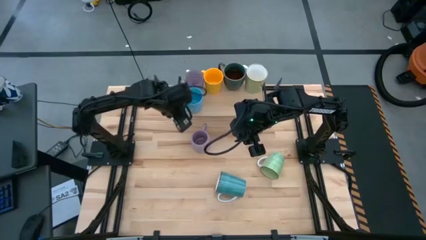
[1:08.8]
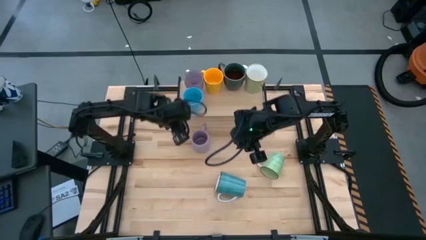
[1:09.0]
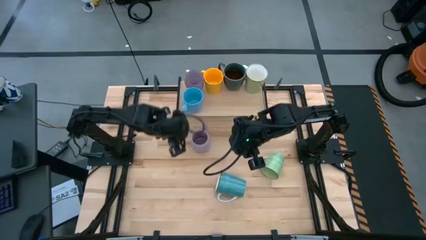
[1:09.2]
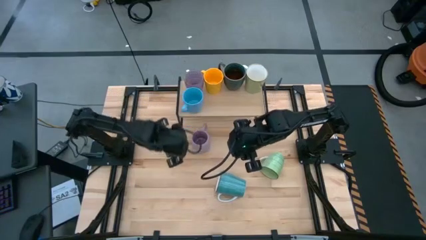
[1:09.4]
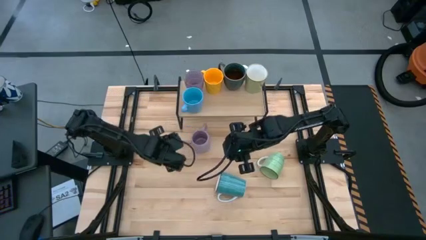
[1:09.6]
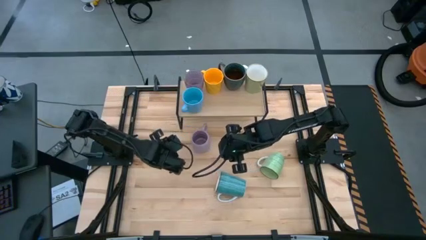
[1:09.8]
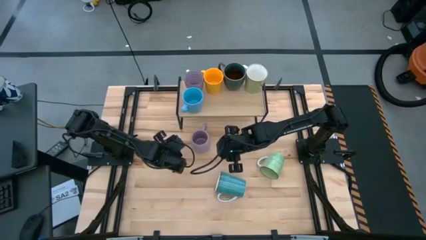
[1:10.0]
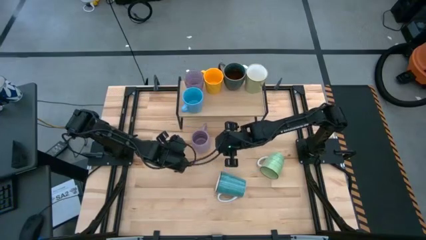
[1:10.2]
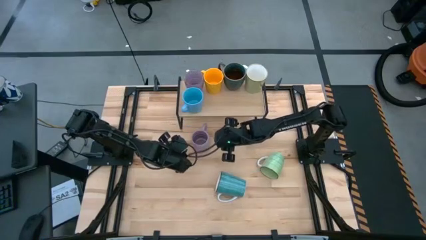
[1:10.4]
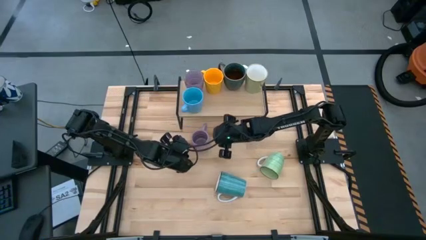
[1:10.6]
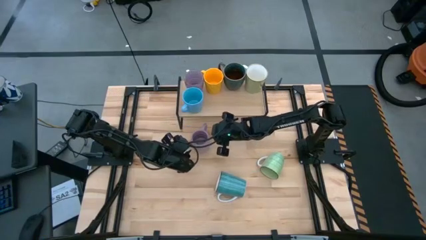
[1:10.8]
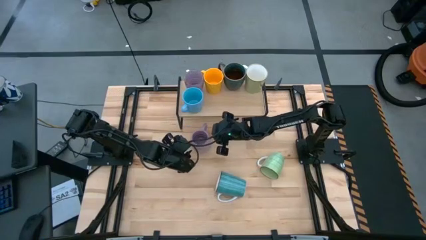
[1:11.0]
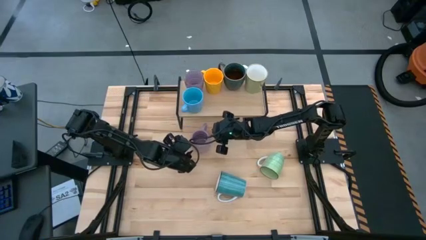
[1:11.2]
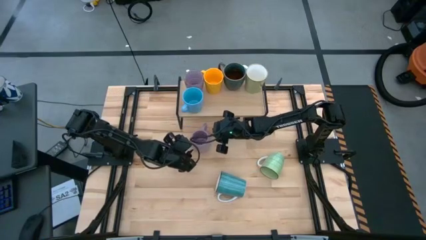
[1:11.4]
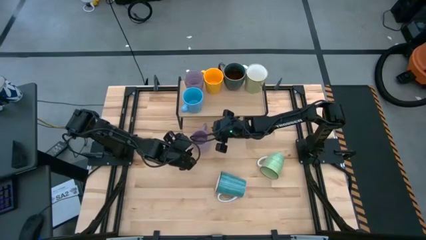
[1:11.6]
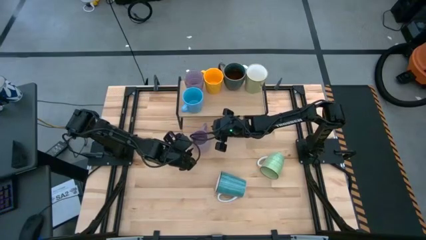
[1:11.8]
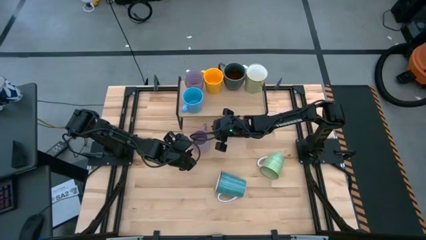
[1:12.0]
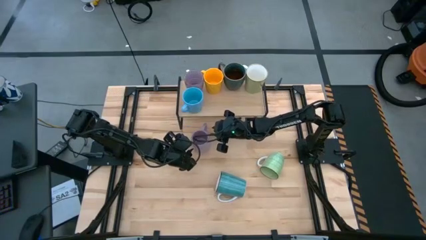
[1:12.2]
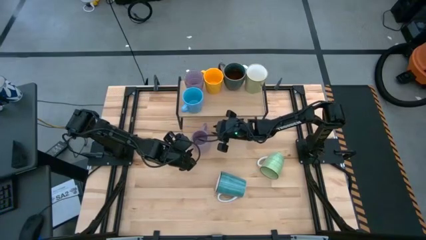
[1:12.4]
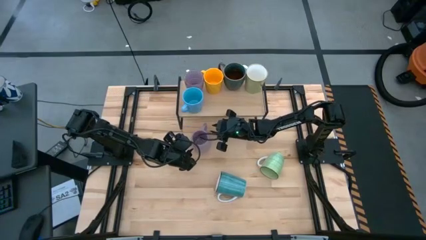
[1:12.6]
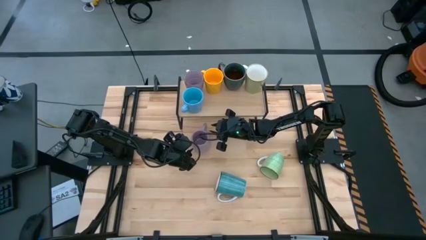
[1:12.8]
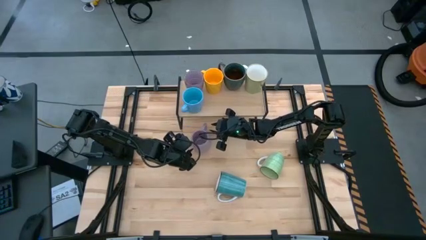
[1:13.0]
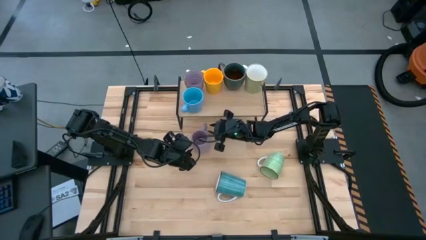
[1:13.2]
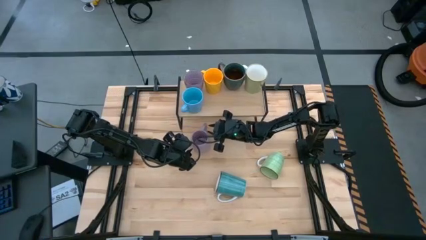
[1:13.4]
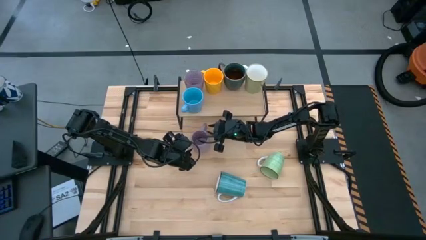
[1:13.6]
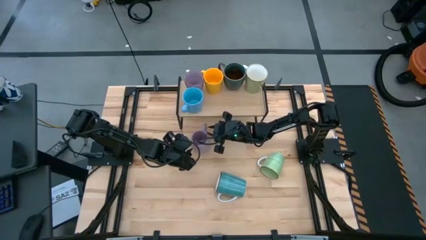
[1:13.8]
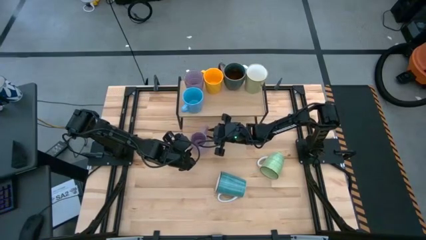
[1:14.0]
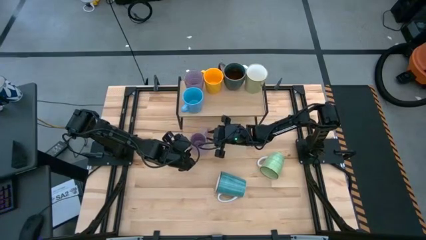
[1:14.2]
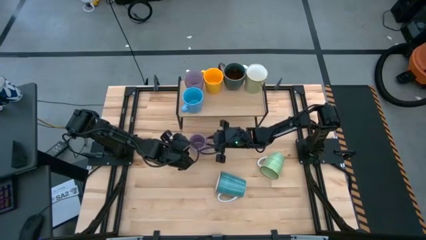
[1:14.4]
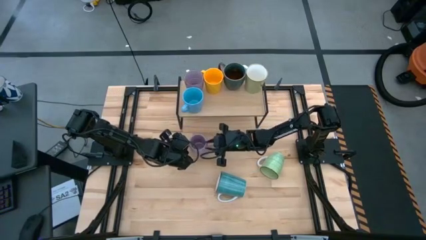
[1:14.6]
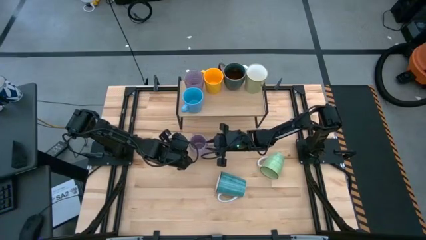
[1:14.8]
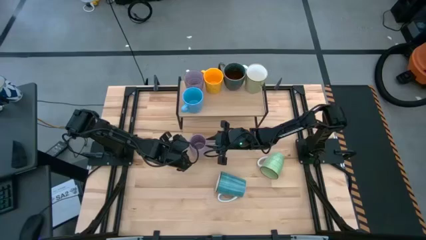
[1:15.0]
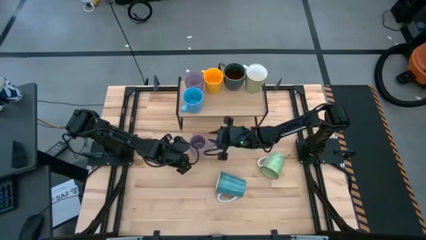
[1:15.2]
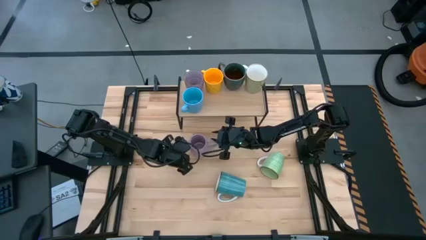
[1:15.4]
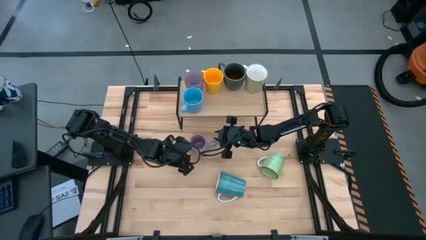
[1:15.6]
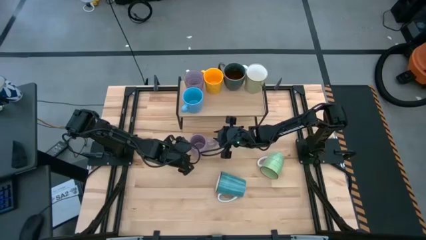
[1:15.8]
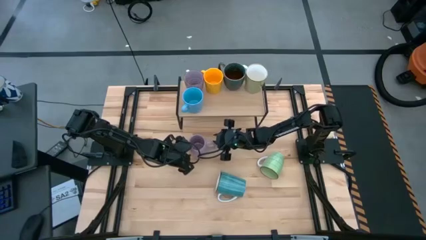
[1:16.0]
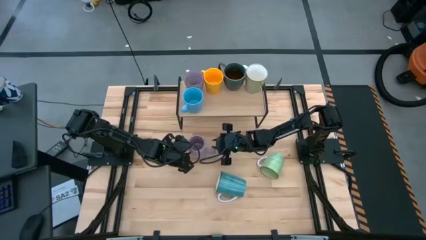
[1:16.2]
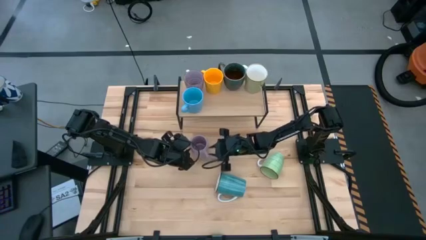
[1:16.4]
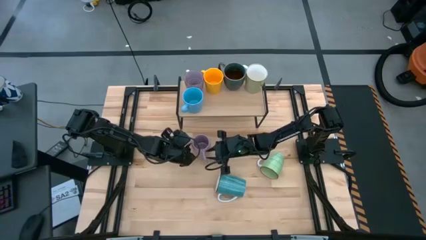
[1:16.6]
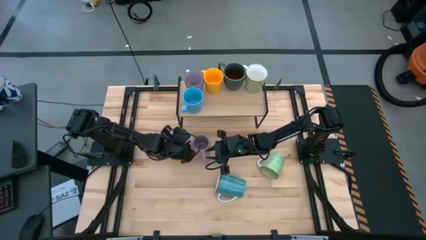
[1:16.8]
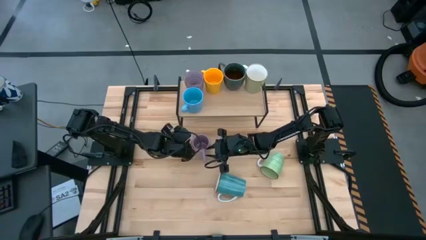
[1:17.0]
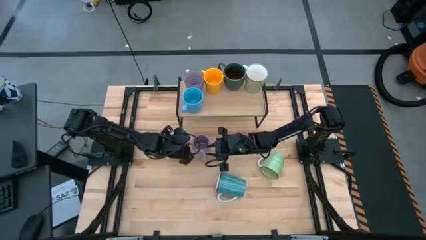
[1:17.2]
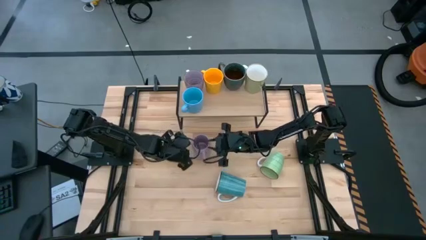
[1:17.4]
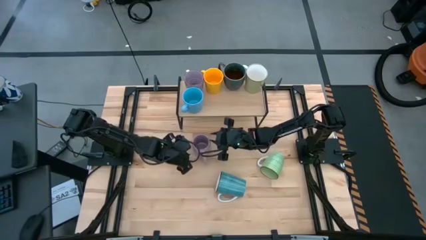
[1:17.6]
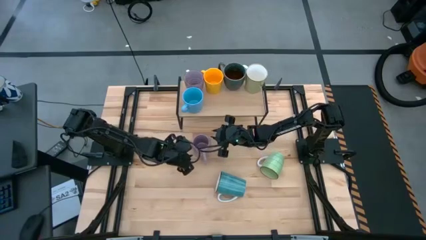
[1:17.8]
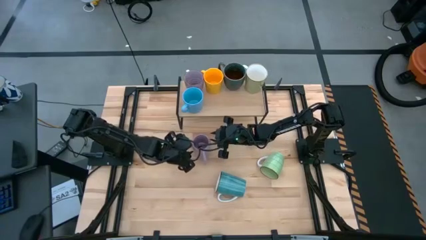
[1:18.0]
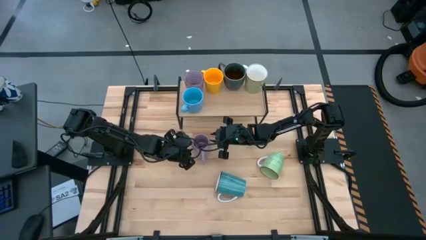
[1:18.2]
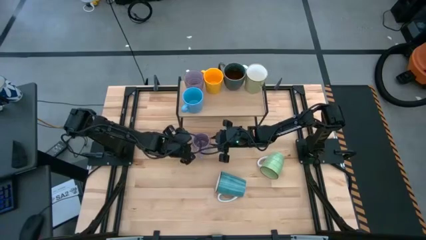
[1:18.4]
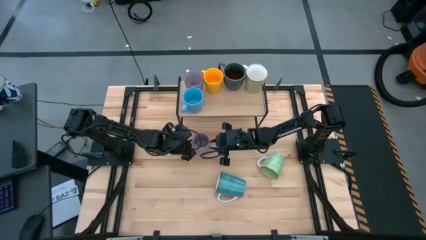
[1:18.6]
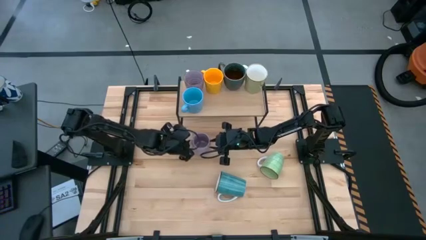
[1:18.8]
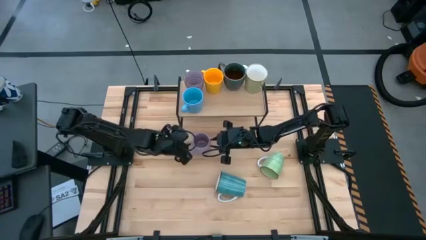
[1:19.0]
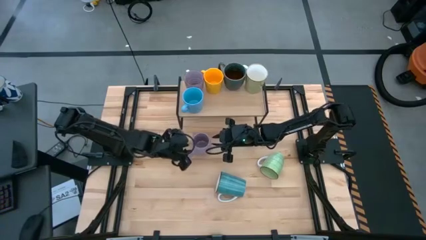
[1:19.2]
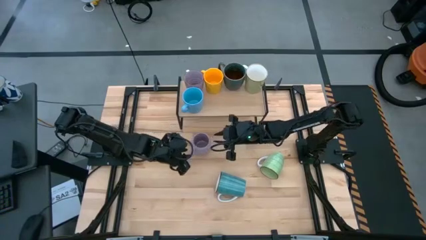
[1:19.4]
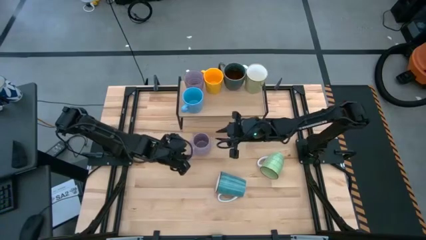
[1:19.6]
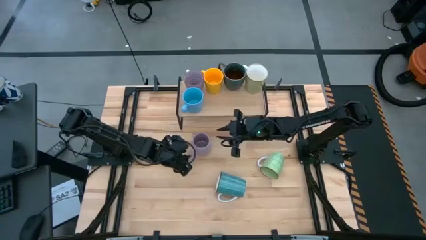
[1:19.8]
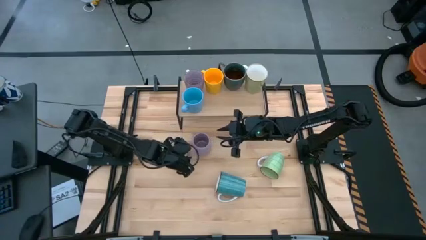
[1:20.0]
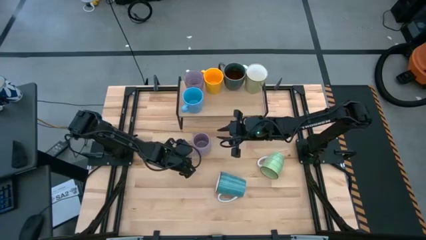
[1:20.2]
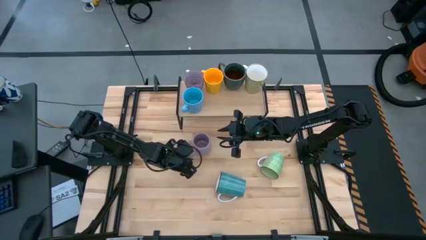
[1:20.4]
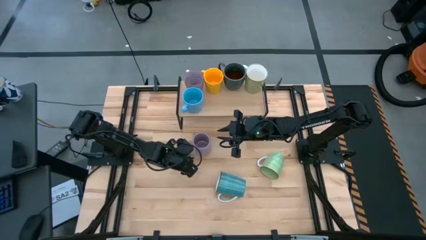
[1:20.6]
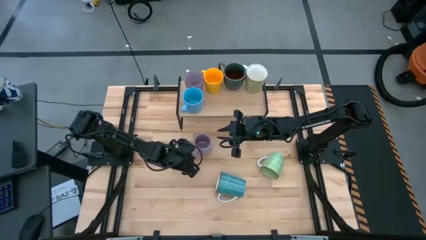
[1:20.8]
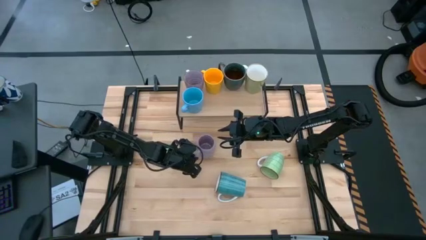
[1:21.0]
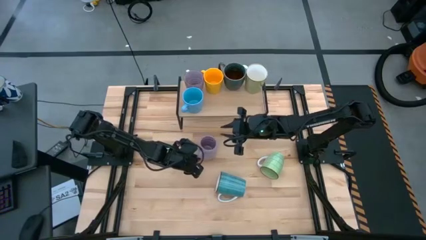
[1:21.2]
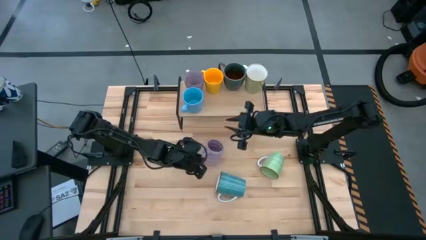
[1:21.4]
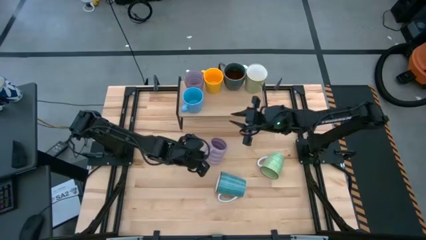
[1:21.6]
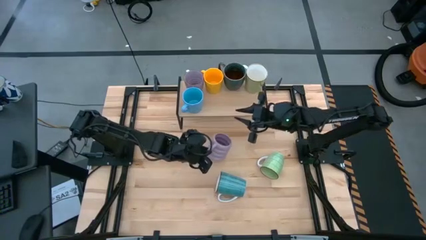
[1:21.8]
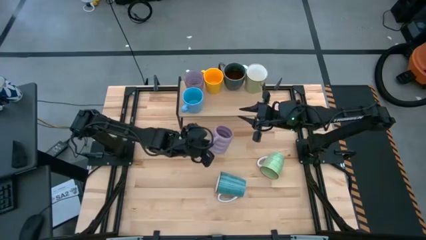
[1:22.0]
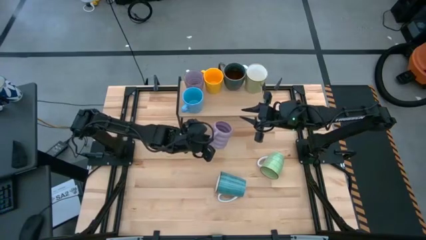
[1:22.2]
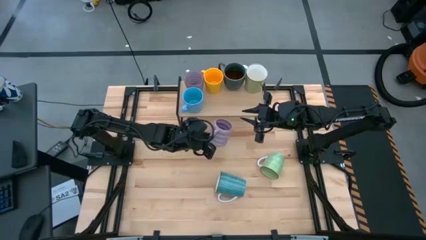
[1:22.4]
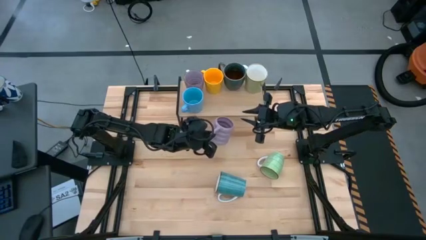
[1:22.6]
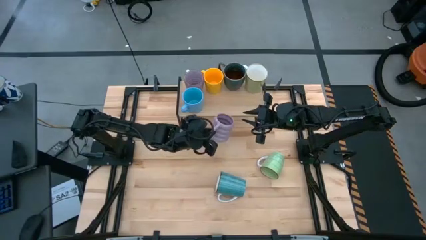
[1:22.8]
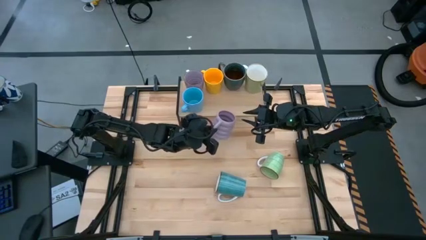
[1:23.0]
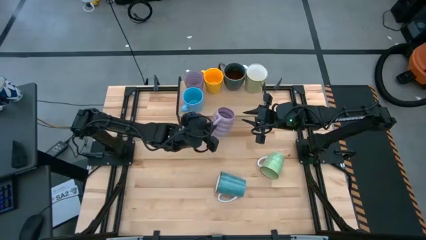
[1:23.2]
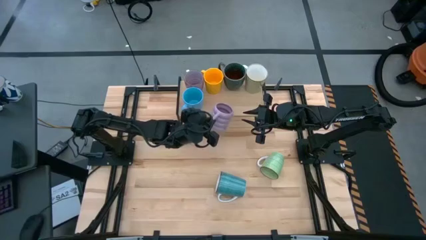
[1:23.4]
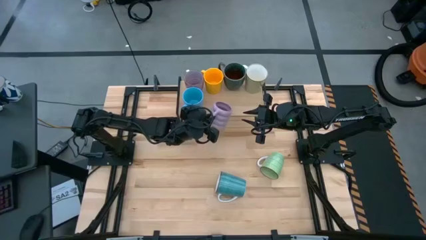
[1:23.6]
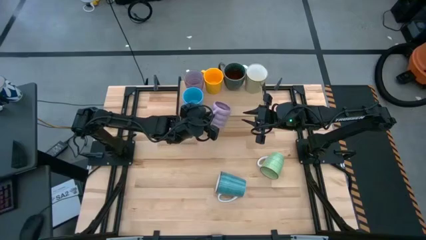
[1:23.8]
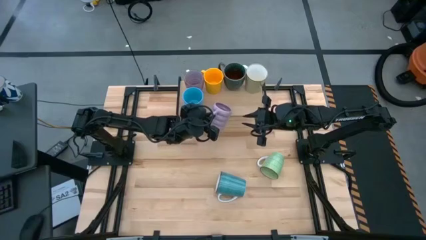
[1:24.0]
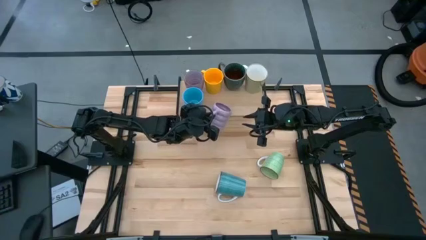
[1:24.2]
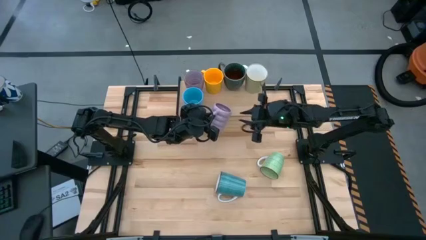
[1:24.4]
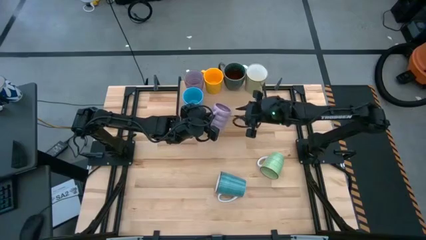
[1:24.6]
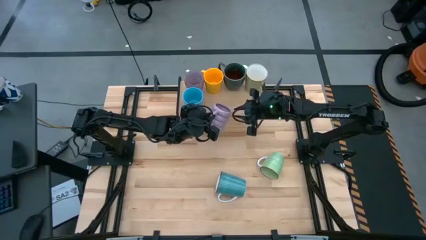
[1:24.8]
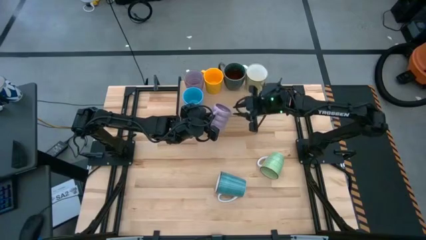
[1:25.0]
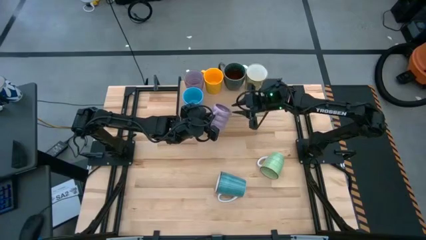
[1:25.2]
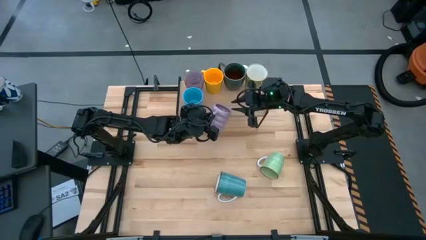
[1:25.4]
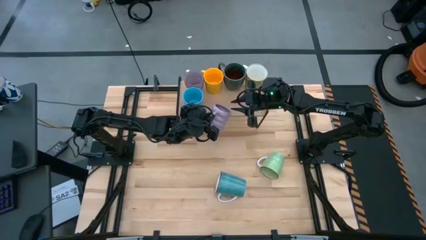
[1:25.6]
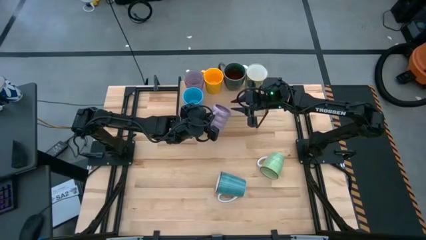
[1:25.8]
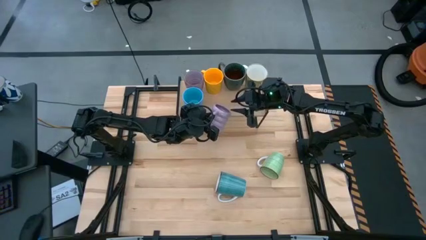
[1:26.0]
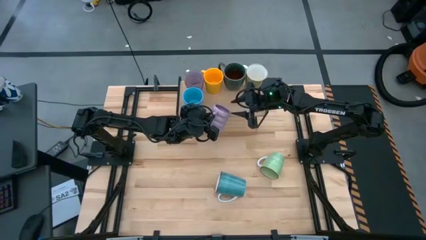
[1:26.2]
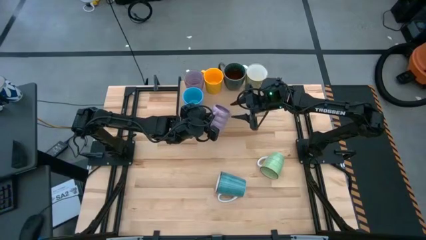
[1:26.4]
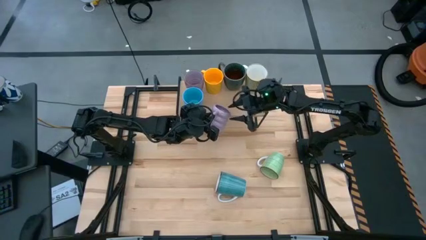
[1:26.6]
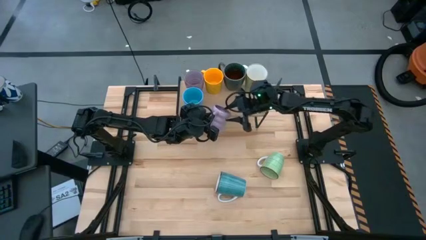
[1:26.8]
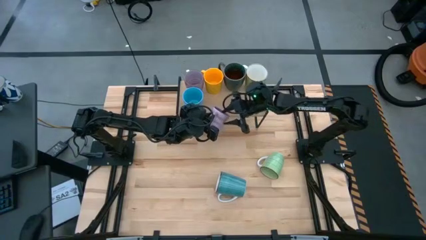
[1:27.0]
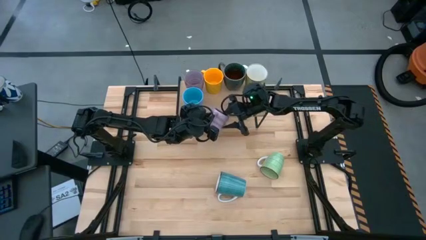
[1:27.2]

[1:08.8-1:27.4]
Task: Place coffee mugs
Put the violet mug on the shelf
